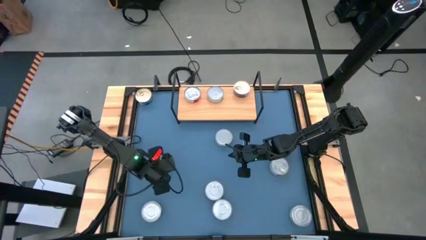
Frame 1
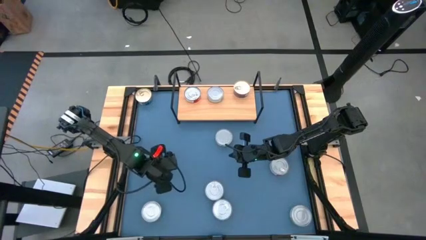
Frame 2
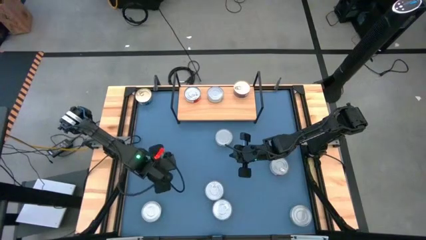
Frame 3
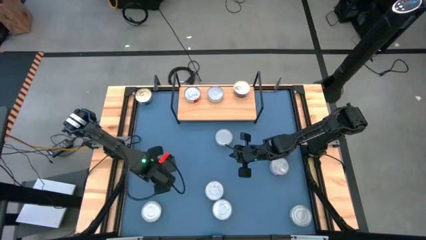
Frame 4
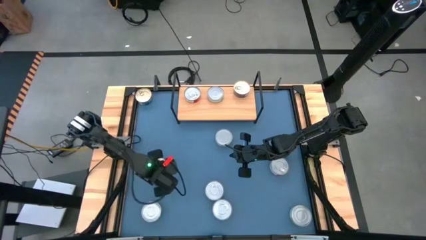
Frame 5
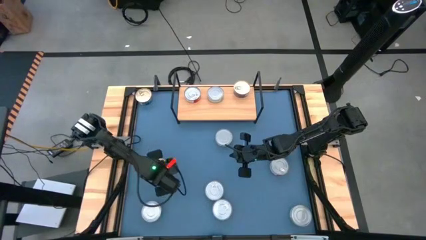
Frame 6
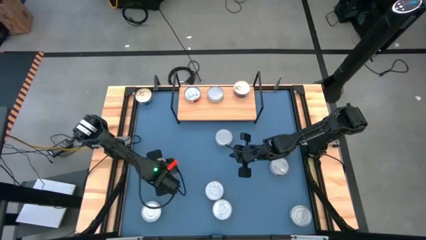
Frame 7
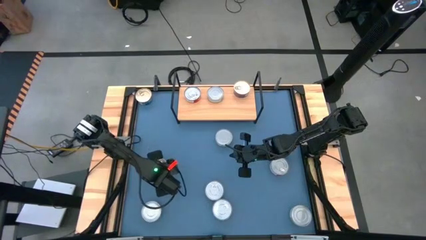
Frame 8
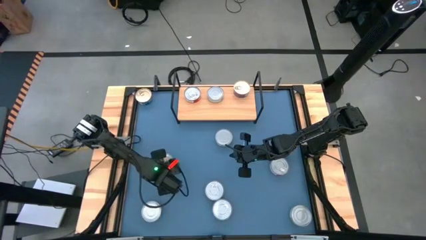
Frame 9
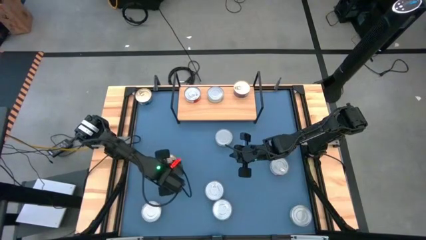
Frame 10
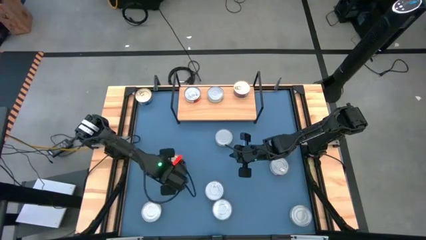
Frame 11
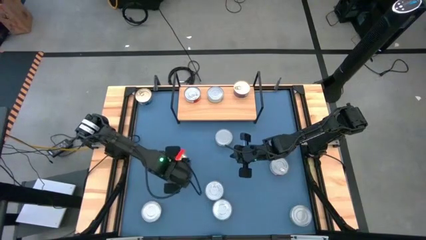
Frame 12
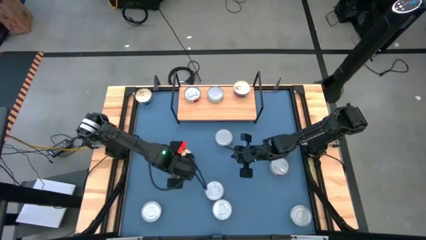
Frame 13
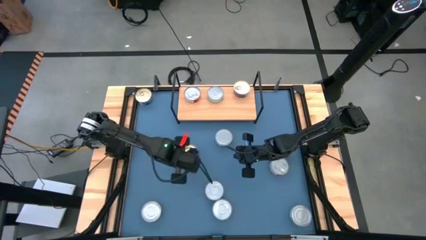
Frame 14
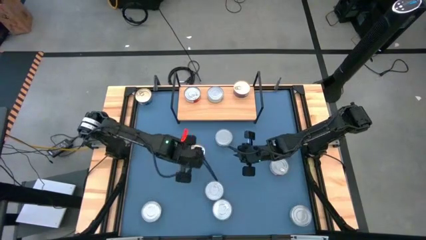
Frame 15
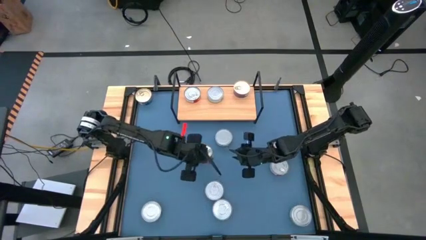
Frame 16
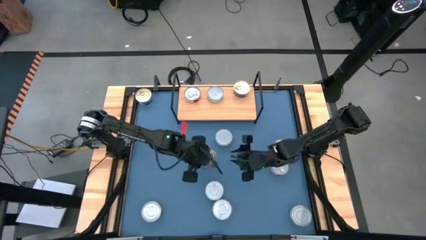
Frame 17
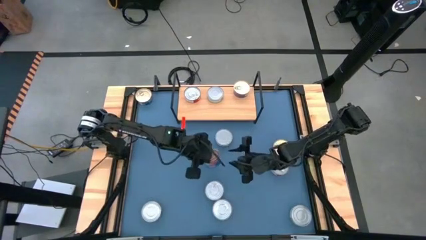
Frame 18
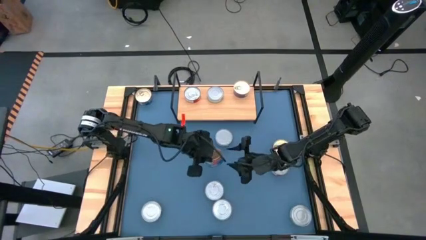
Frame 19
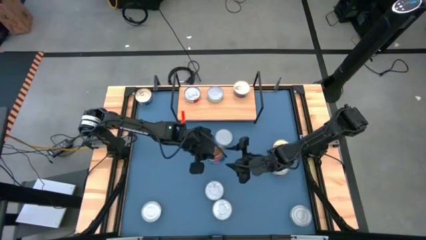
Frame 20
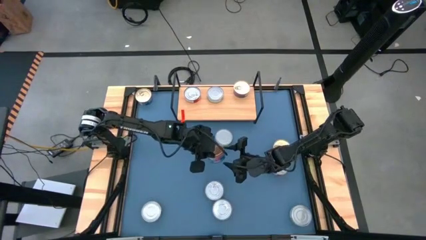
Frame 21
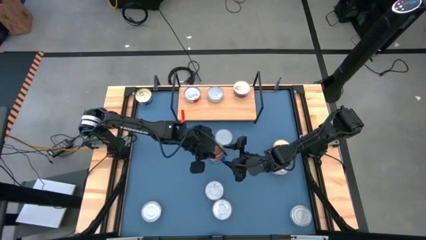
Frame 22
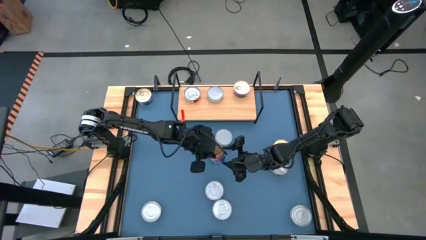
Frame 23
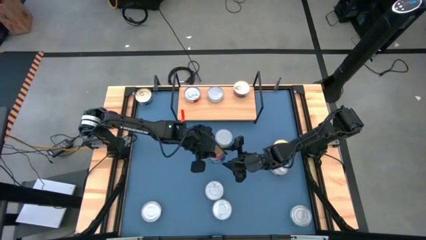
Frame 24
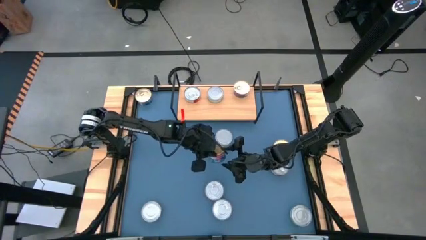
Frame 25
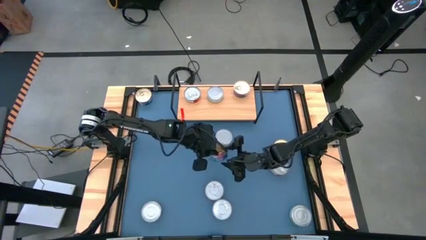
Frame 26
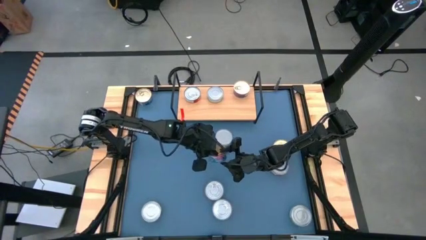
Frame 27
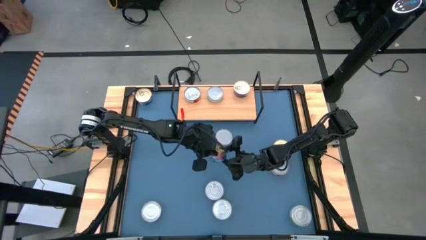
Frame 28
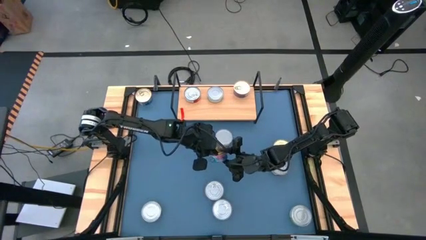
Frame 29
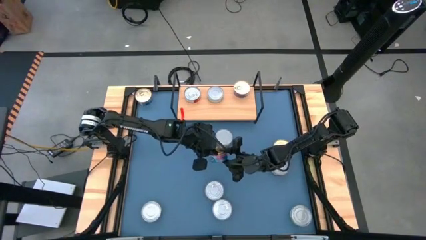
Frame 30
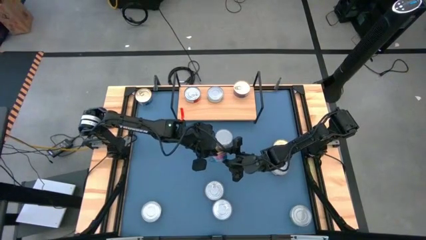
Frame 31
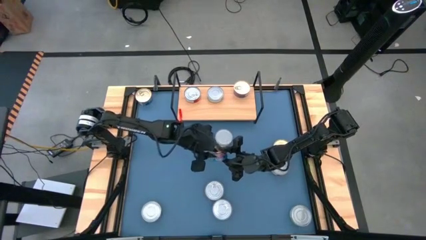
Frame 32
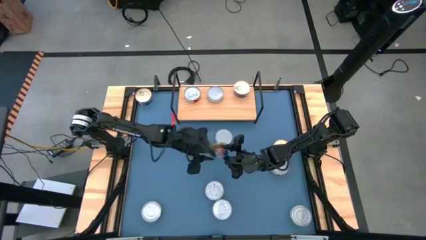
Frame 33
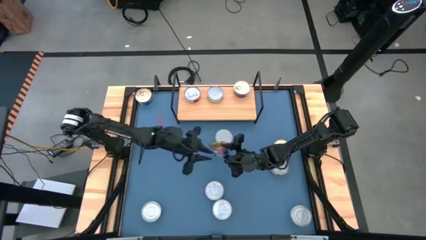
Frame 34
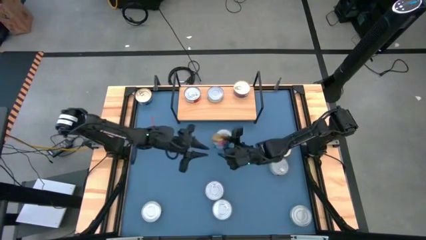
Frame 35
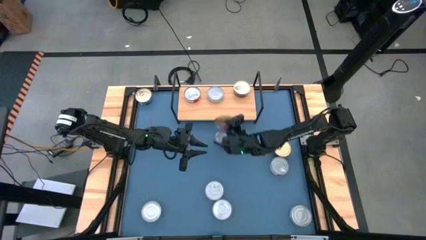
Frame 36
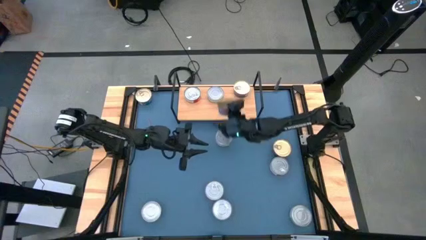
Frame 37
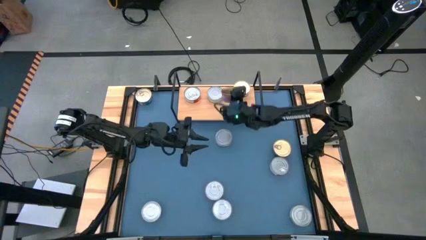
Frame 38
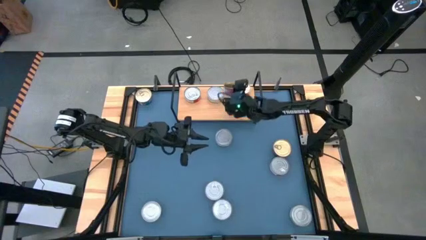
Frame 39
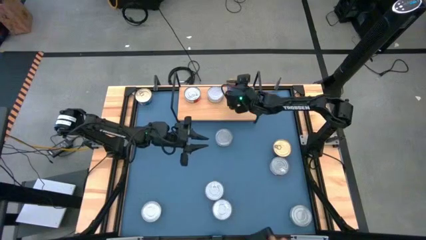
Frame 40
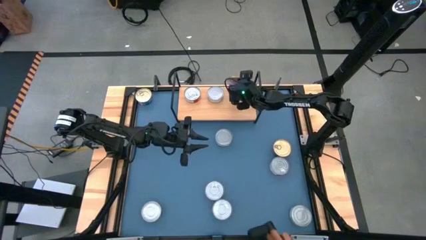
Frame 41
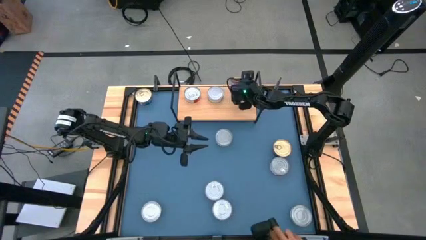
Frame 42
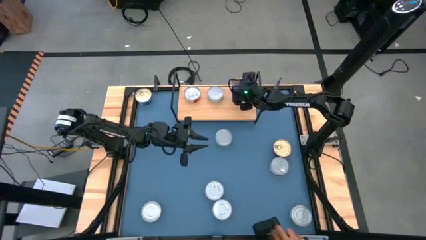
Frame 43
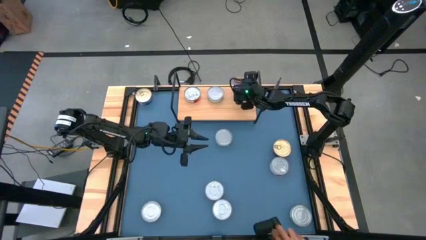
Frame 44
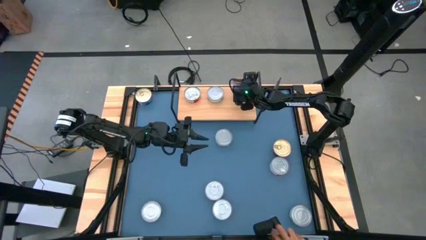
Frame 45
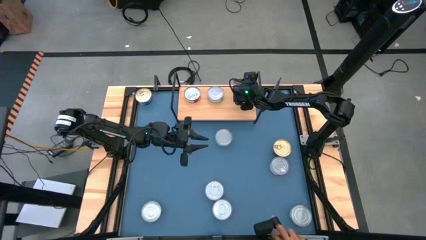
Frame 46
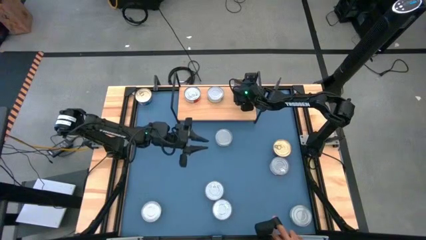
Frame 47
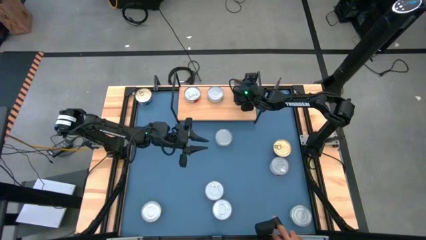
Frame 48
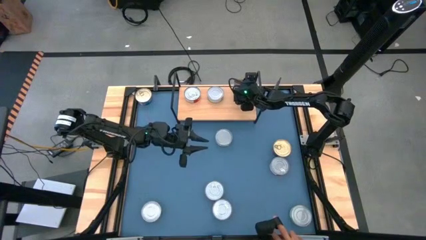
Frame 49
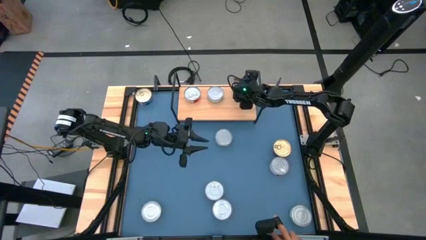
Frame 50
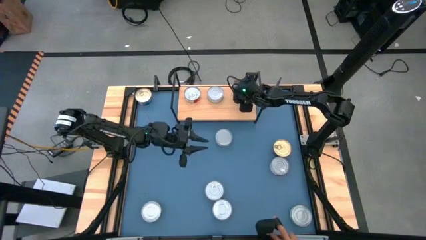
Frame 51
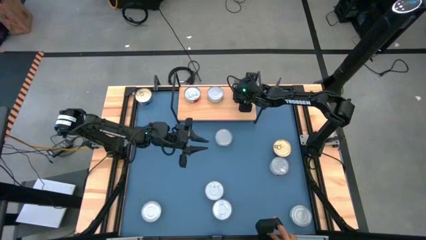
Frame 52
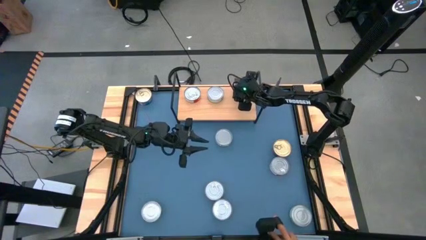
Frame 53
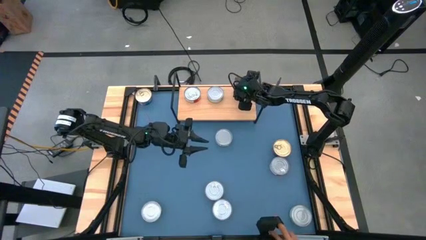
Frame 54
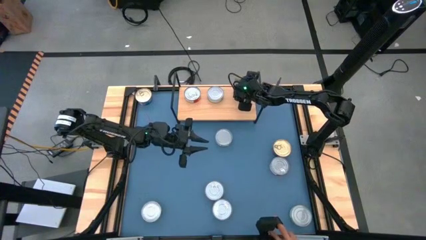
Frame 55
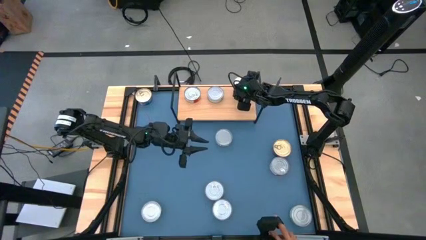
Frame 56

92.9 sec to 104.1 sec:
Task: Stack canned seafood by type on shelf
Stack the blue tuna can on top of the blue tuna can on the shelf

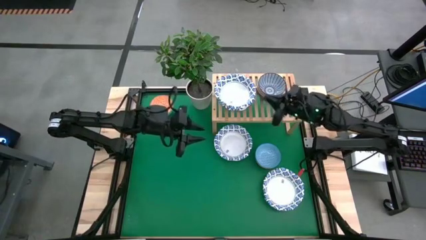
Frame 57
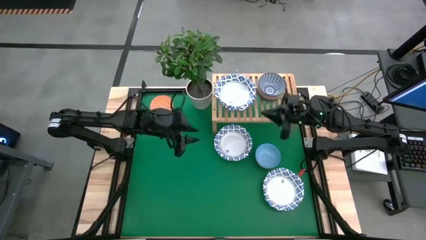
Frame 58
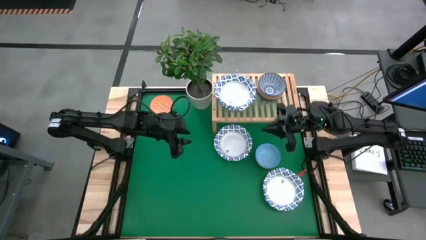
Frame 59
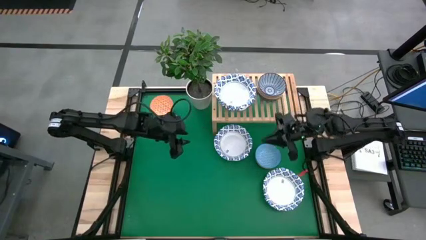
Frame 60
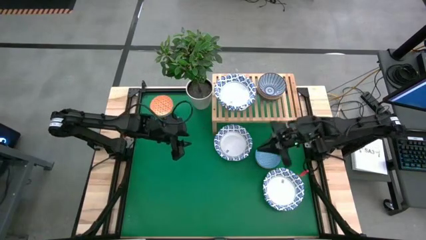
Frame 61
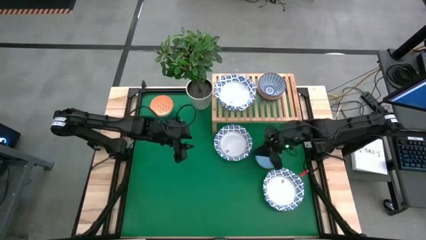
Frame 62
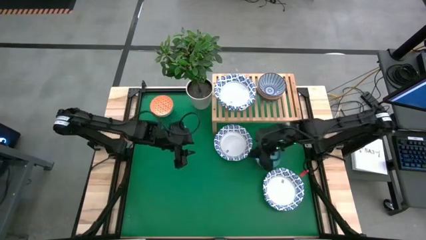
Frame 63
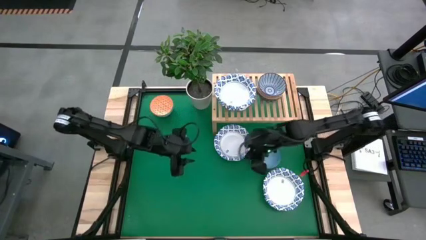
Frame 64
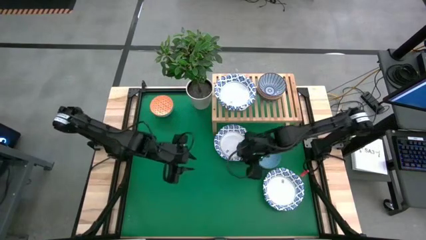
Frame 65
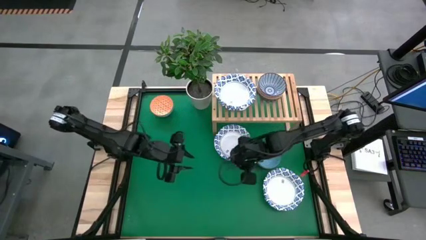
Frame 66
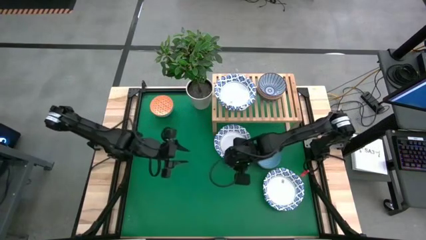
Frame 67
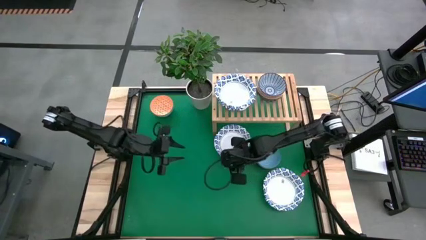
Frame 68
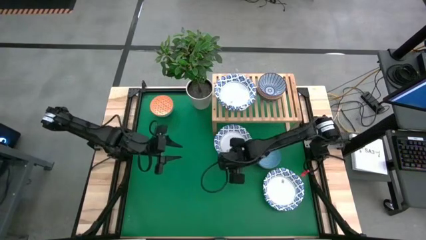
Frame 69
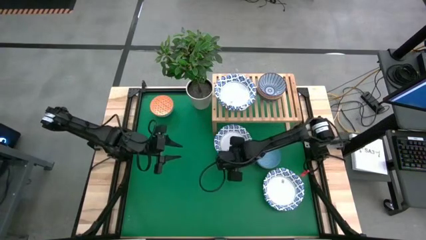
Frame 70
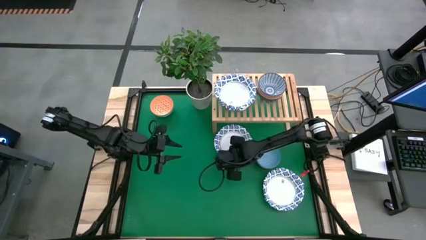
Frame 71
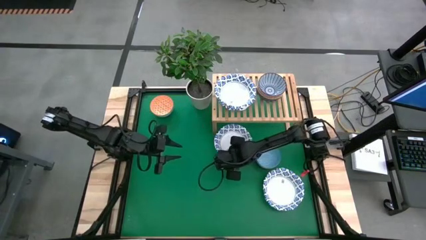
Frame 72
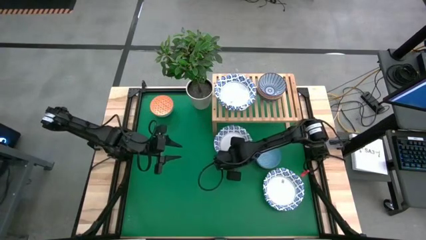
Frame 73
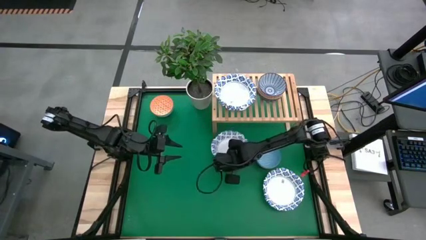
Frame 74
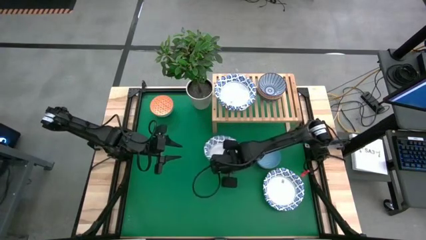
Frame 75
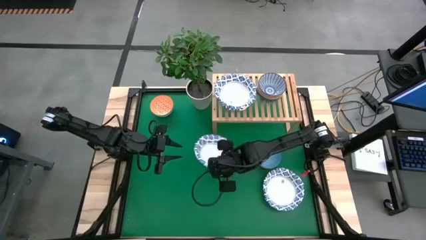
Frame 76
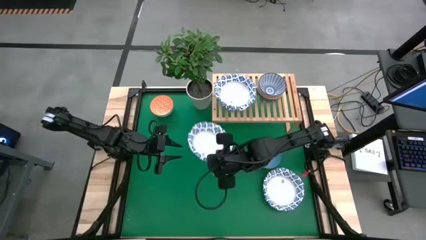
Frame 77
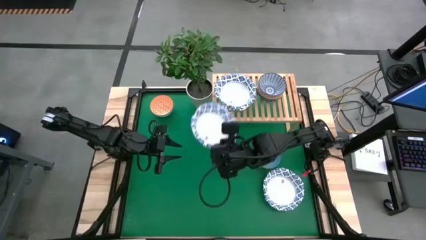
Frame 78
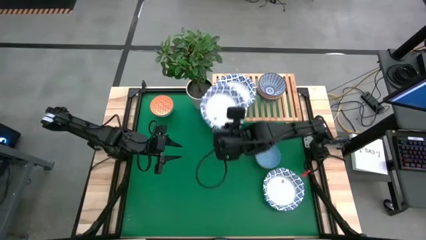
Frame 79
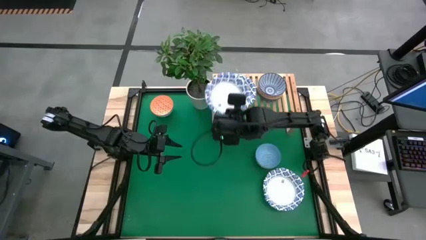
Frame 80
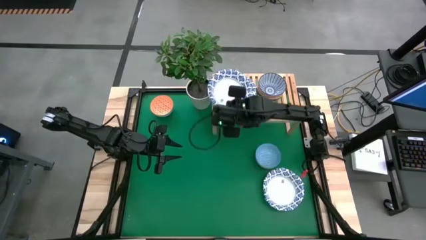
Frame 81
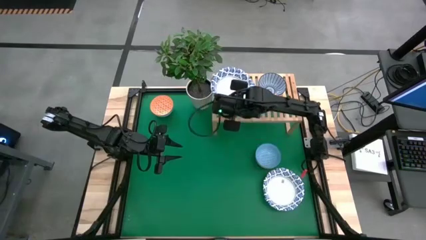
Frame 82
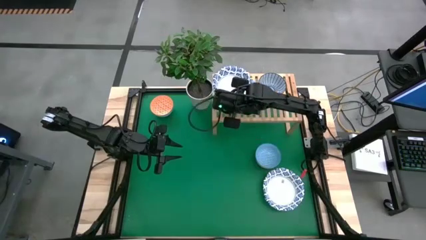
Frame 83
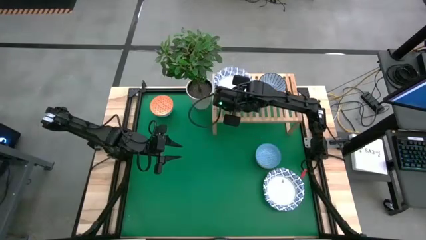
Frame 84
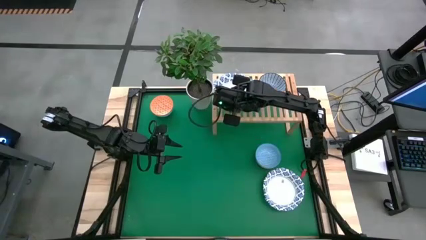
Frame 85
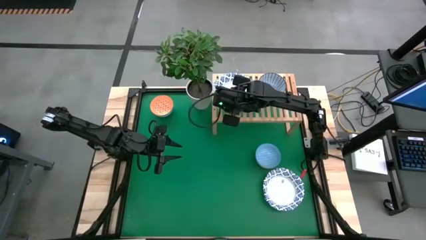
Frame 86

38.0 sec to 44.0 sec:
Task: Place and stack bowls onto a shelf
Stack the top white plate on top of the white plate on the shelf

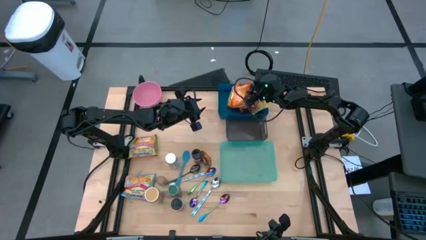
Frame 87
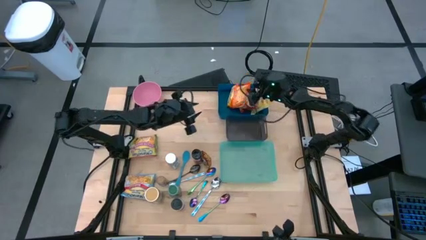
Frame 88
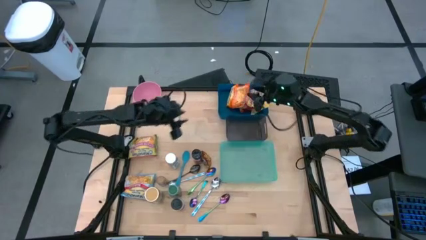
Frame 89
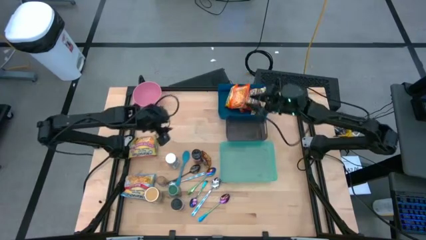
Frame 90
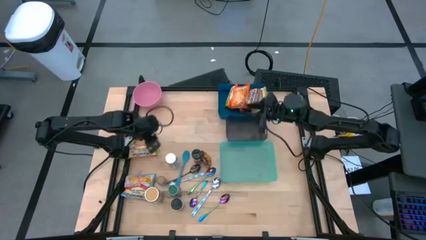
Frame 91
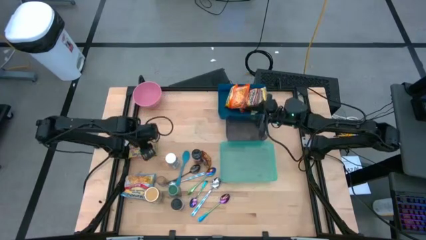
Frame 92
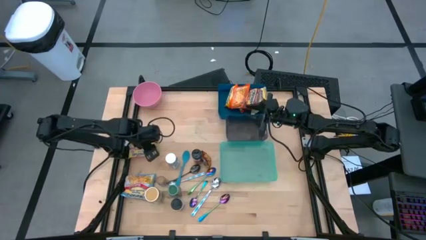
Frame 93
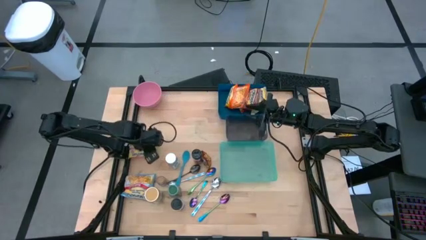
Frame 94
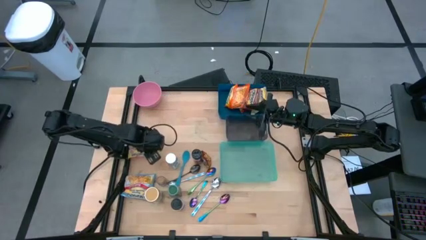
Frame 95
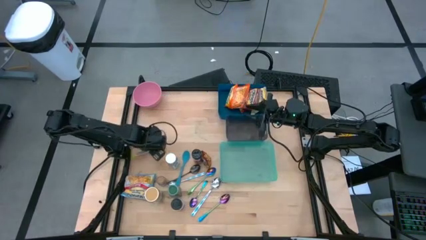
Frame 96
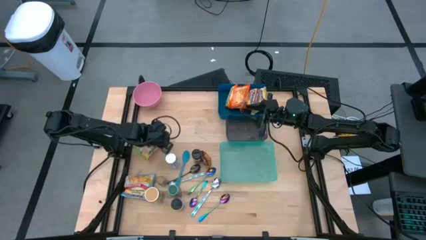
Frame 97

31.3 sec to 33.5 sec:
Task: Pick & Place Food Item
Put the green noodle pack into the blue bin
